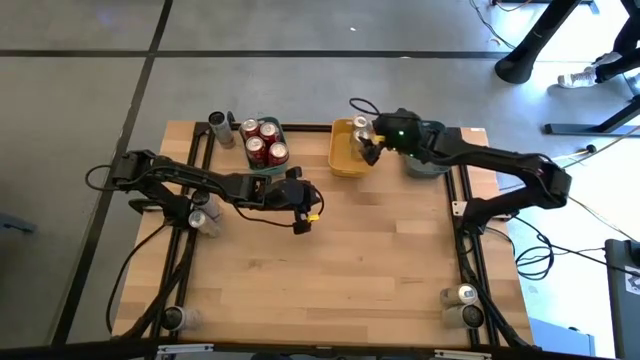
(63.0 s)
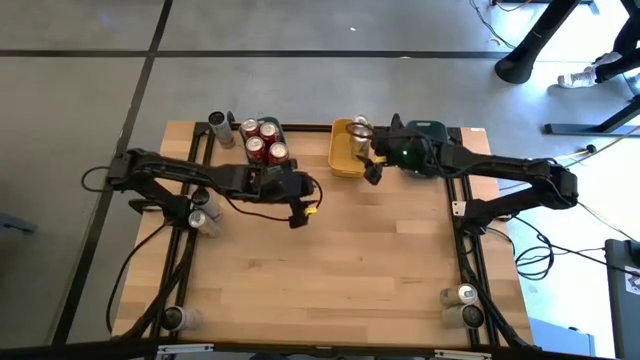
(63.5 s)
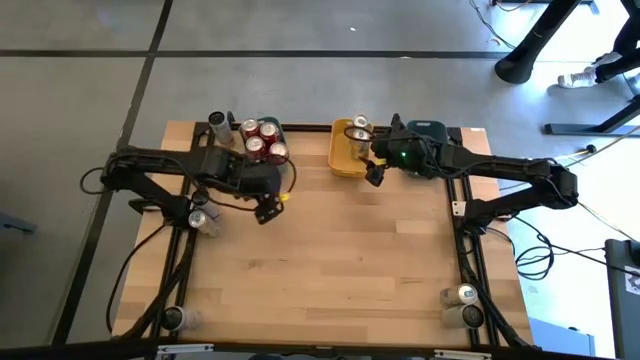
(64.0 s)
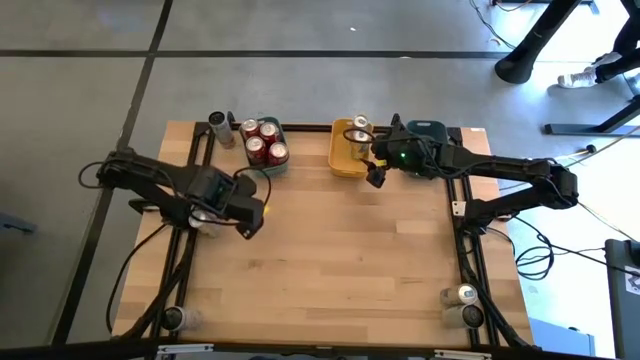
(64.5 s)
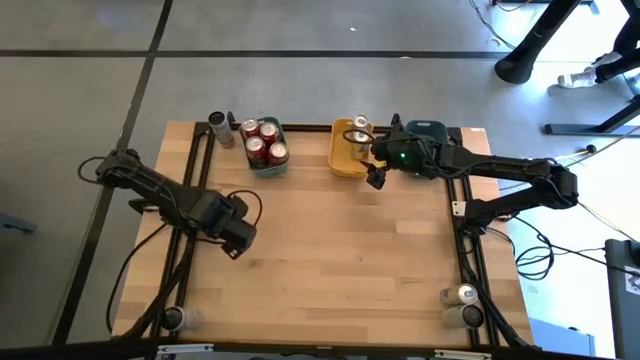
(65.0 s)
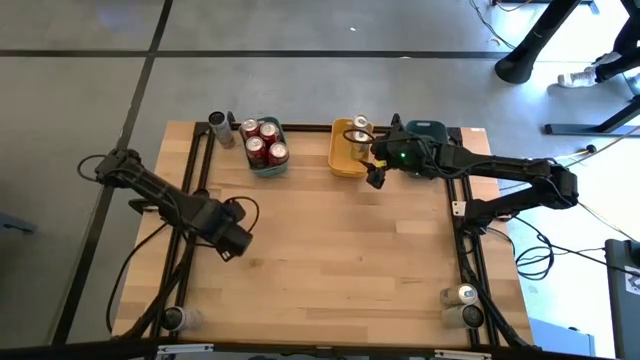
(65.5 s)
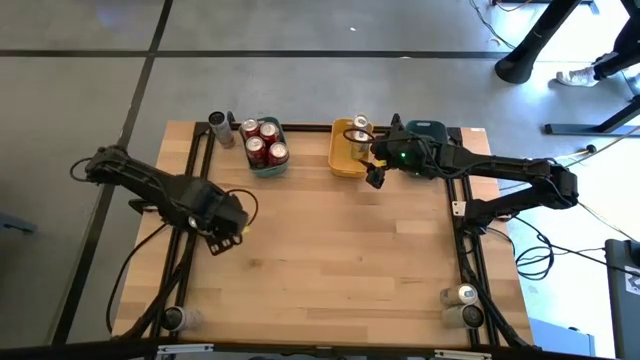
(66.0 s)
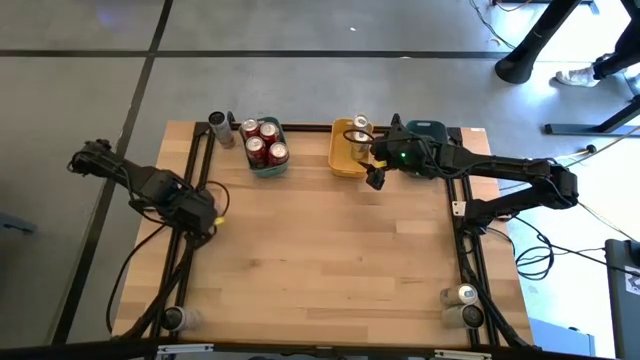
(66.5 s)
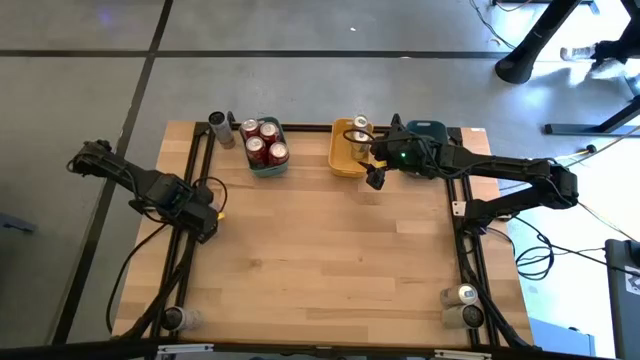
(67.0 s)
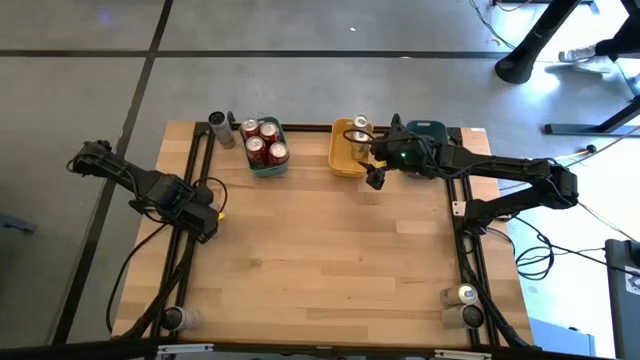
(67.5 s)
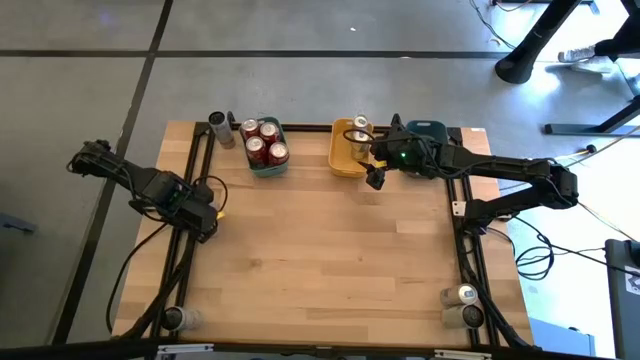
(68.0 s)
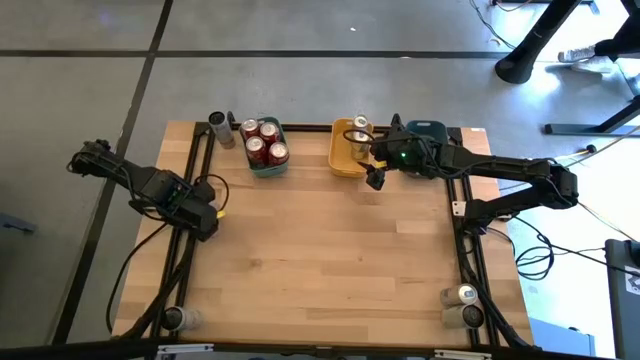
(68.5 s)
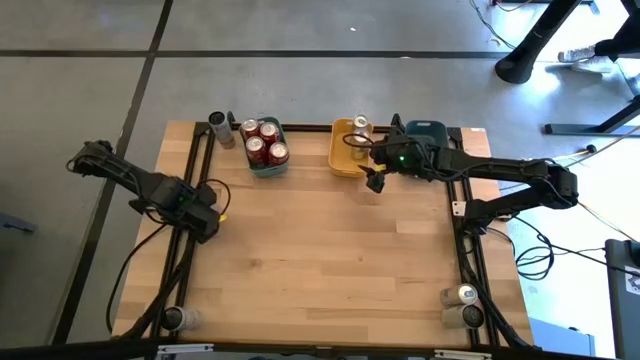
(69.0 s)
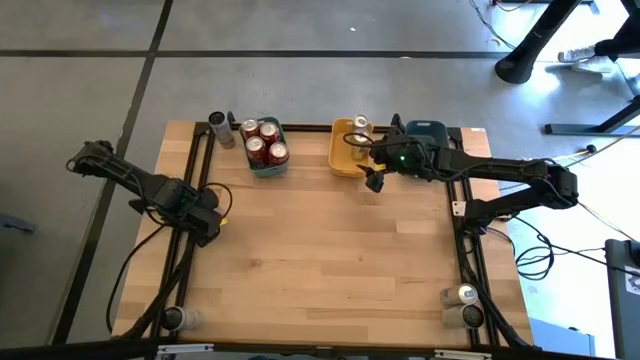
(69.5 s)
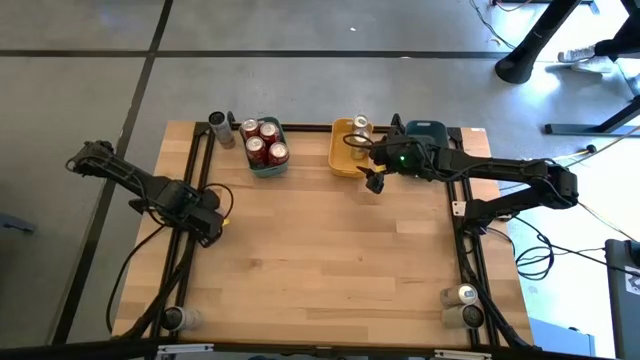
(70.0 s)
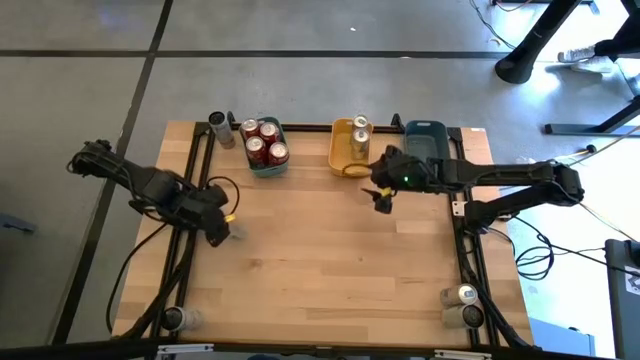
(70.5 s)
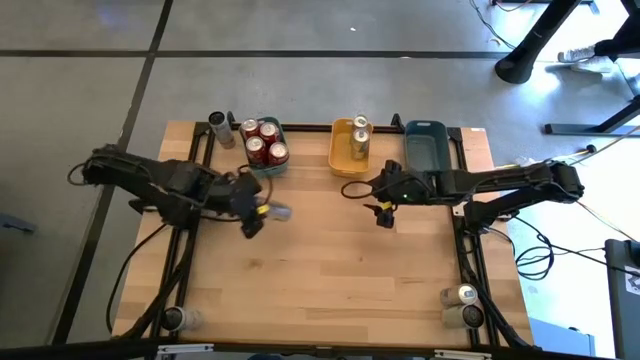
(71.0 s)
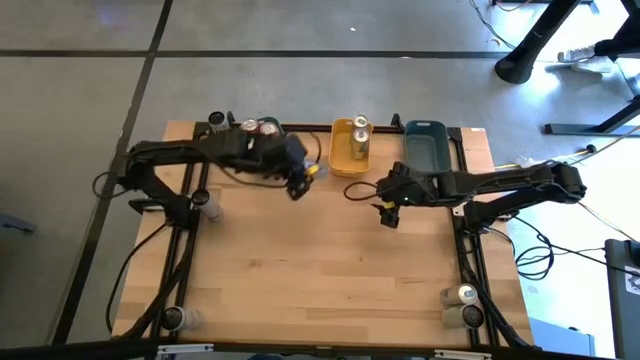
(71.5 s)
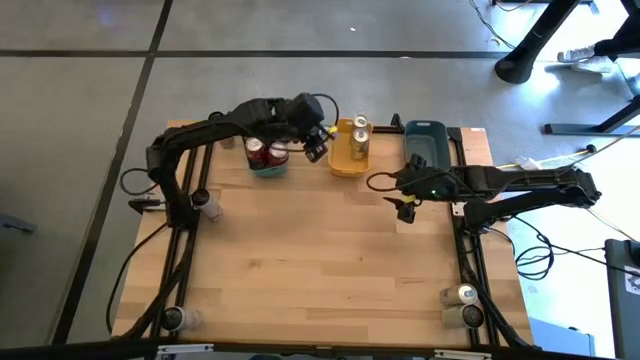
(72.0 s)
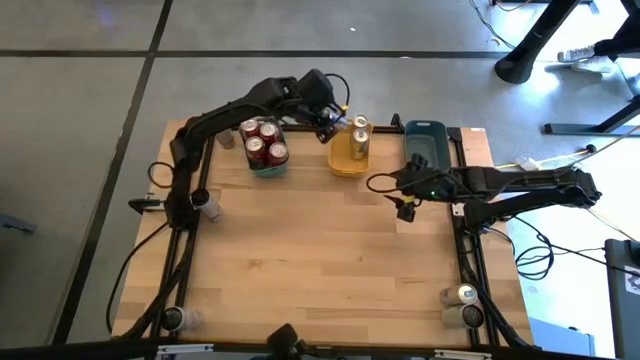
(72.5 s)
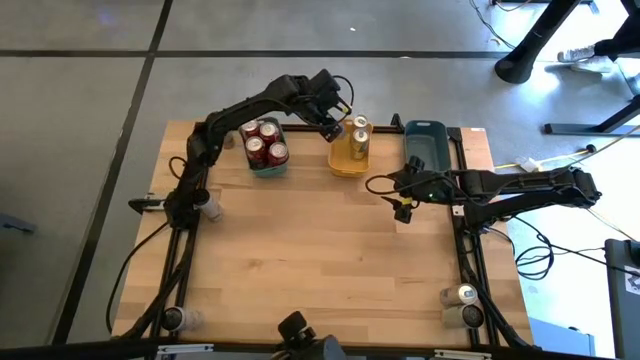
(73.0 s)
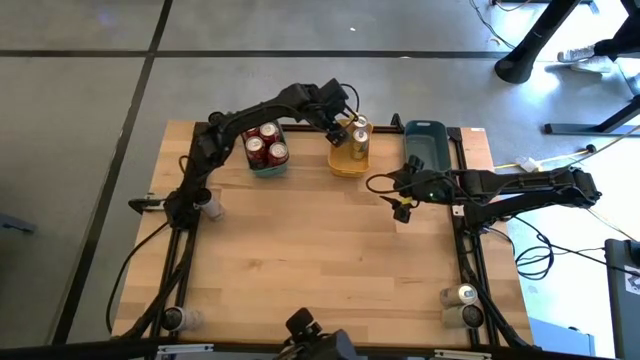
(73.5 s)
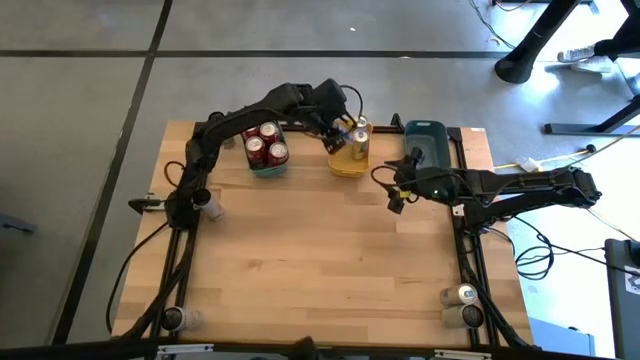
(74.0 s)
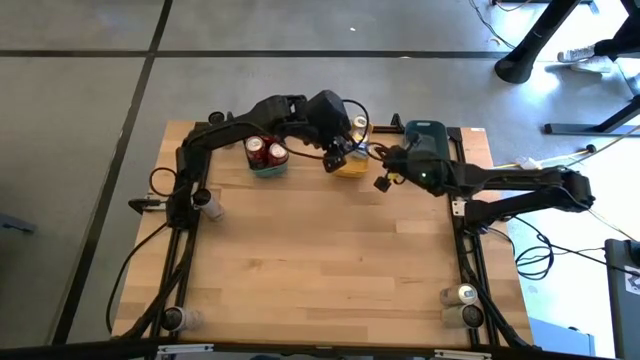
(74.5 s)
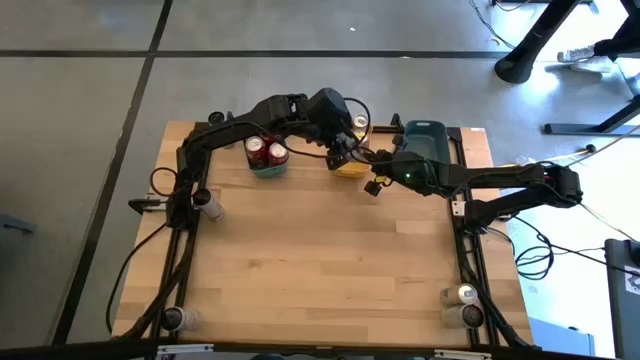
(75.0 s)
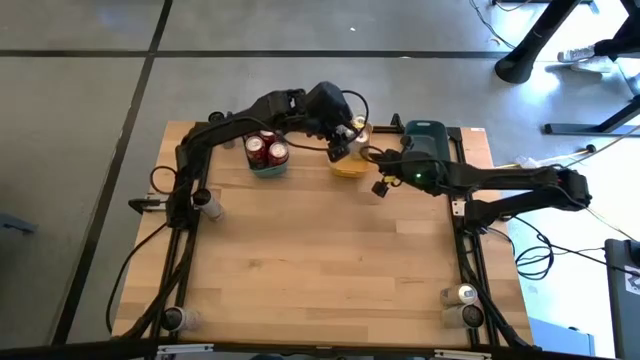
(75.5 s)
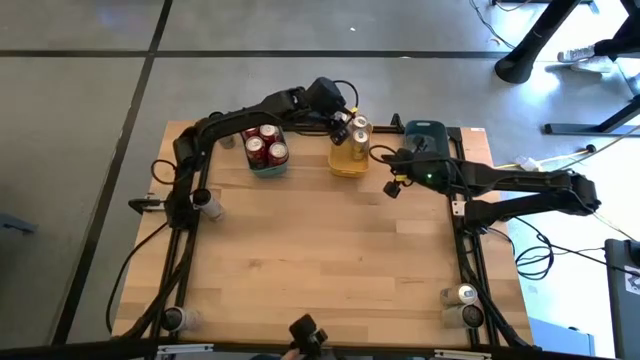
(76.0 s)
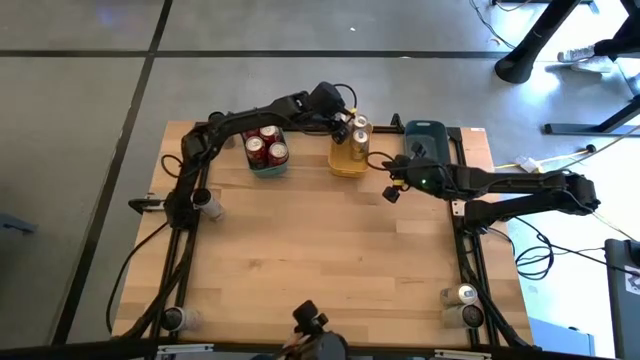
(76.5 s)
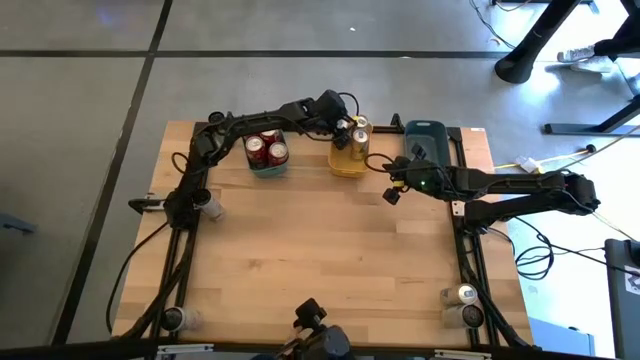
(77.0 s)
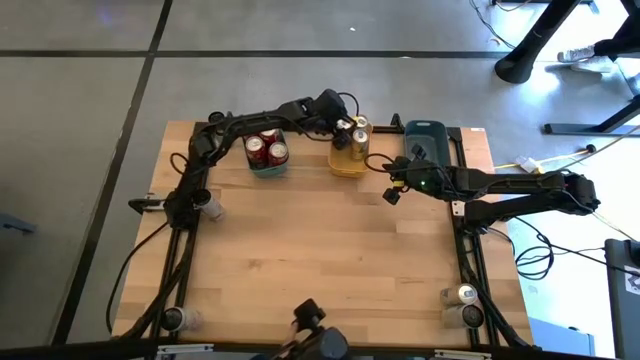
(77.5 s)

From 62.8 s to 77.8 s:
Task: Sort soda cans
Put the left blue soda can into the yellow bin

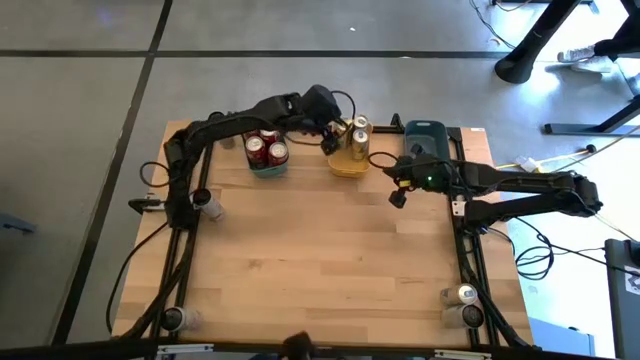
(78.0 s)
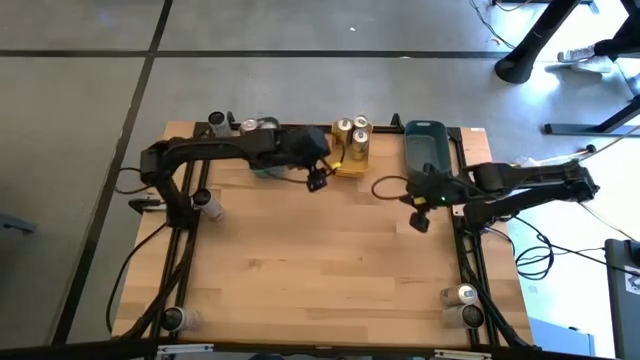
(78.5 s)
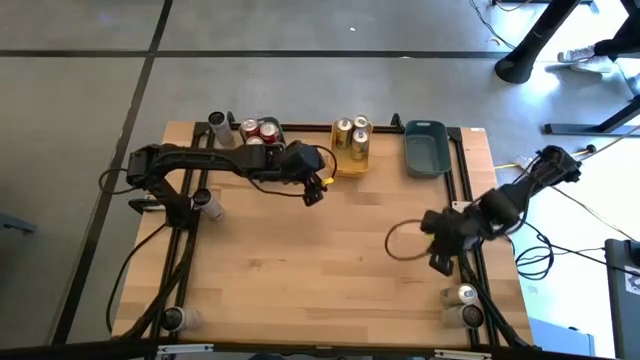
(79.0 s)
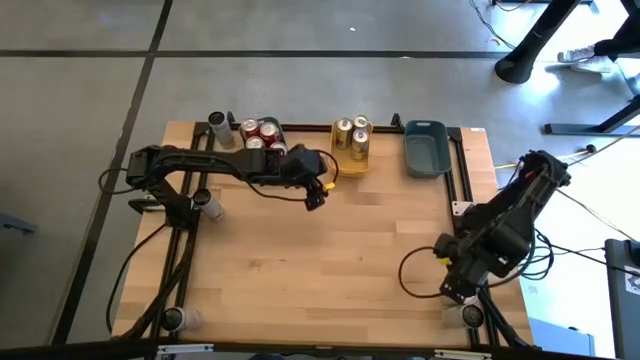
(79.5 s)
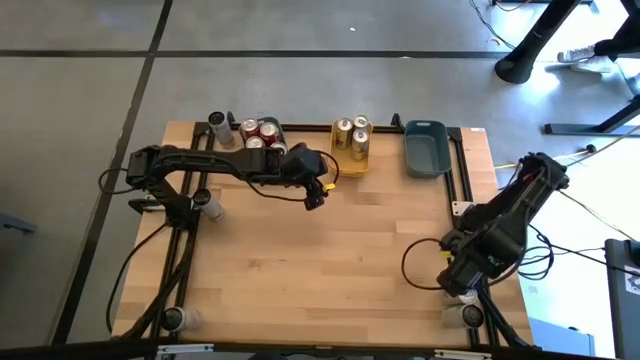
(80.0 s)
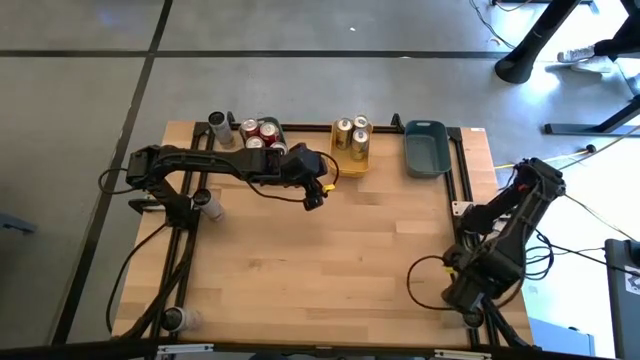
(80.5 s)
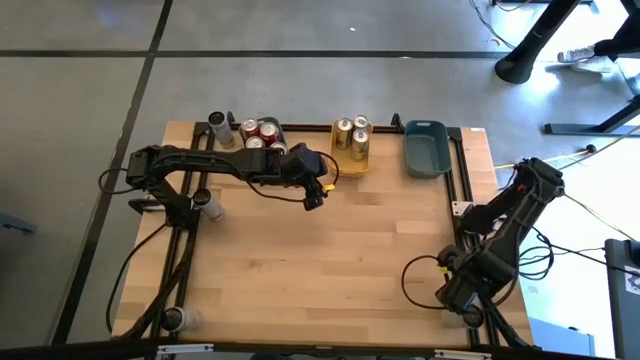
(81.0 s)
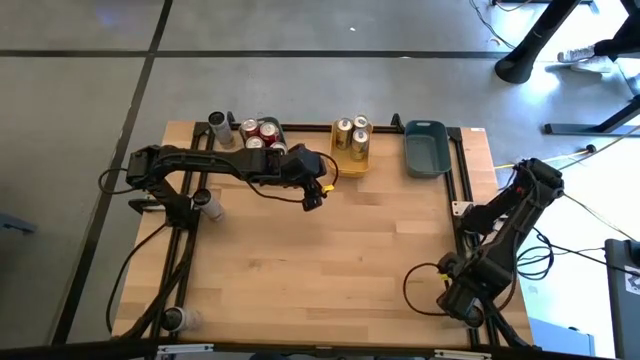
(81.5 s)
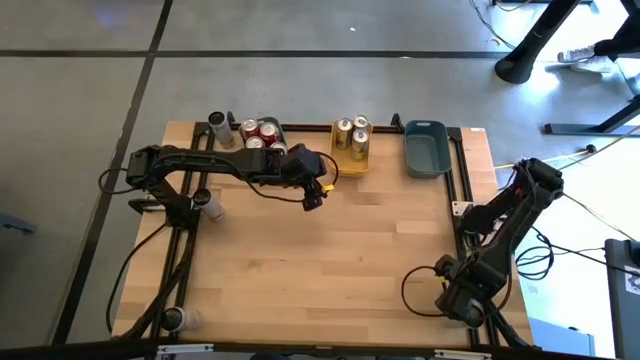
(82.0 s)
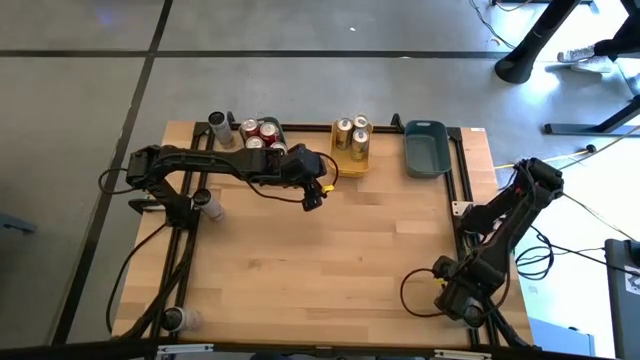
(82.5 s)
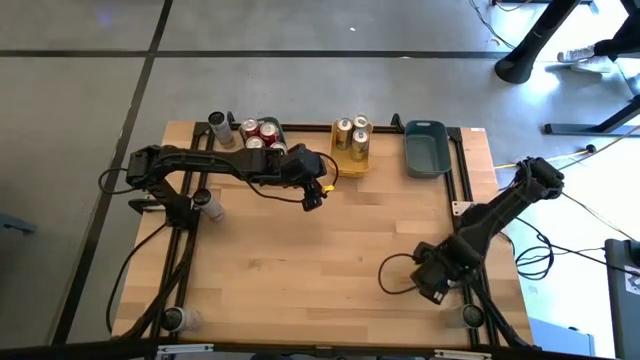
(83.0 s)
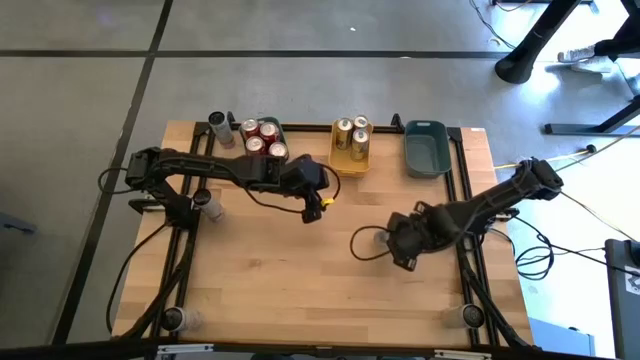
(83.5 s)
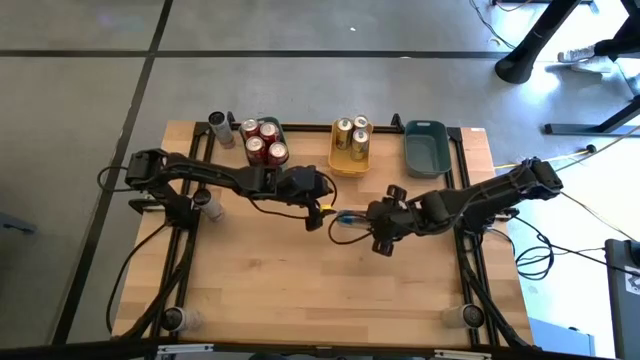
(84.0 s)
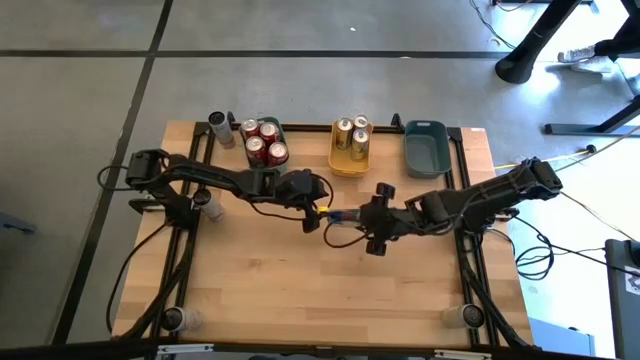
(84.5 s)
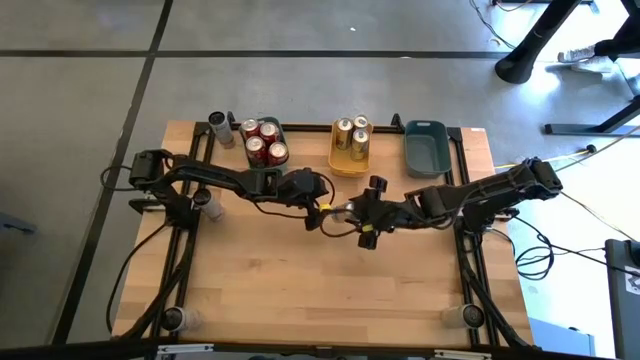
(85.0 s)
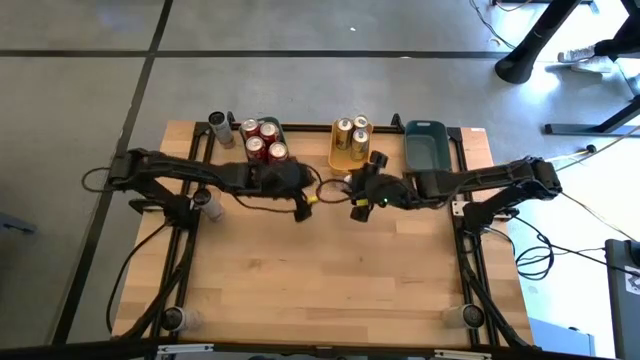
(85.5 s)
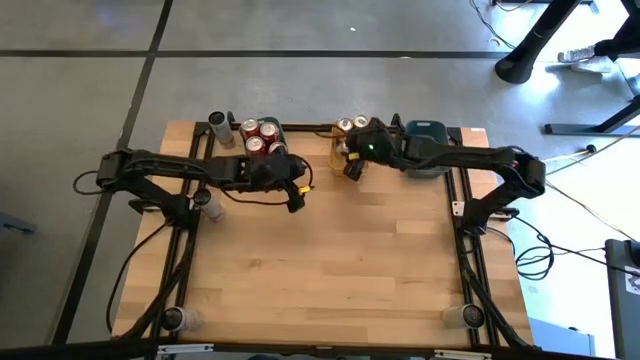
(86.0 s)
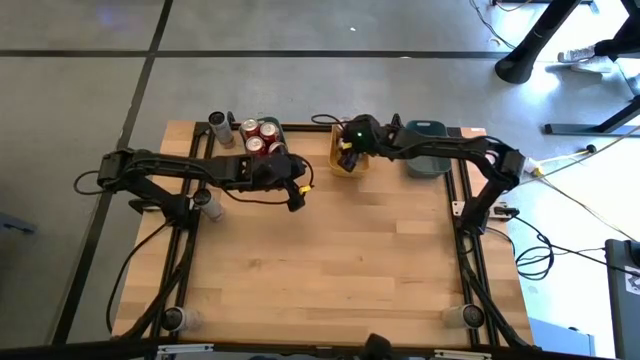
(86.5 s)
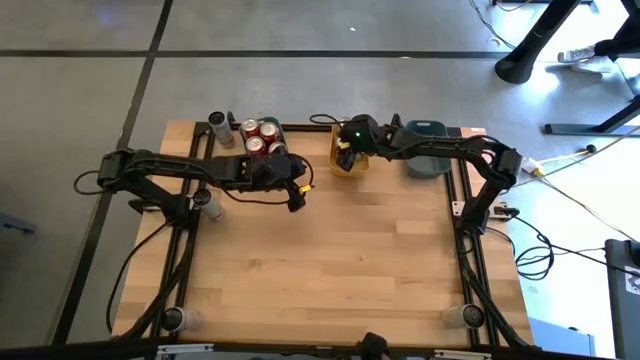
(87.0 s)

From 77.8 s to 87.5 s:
Put the blue soda can into the yellow bin
